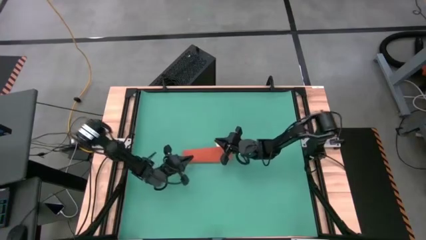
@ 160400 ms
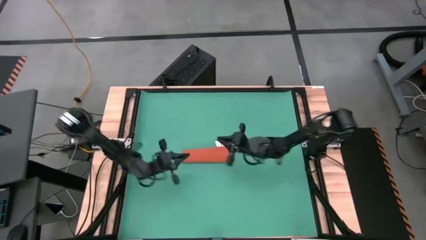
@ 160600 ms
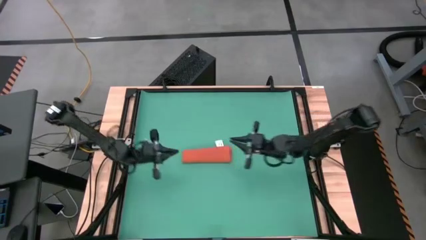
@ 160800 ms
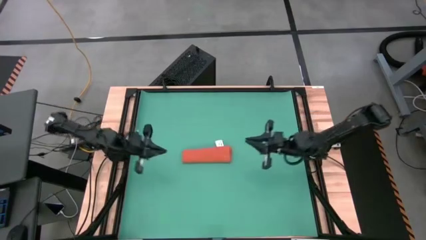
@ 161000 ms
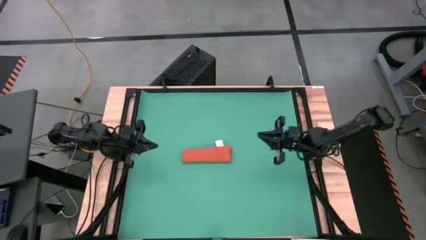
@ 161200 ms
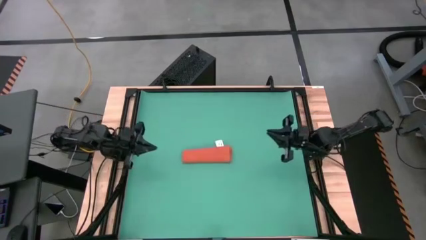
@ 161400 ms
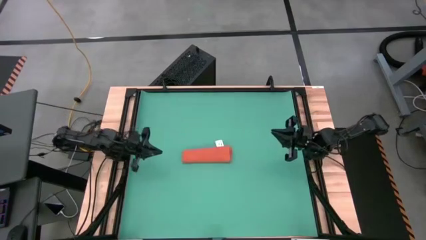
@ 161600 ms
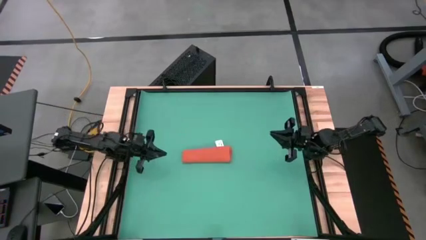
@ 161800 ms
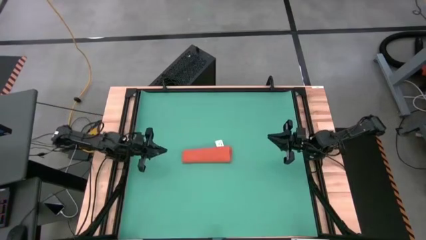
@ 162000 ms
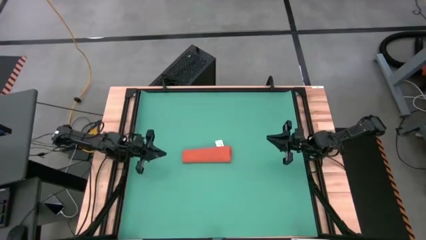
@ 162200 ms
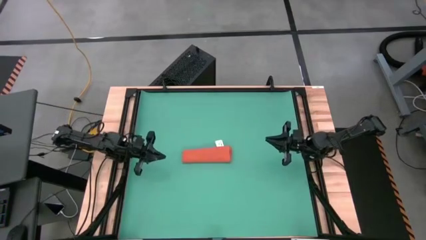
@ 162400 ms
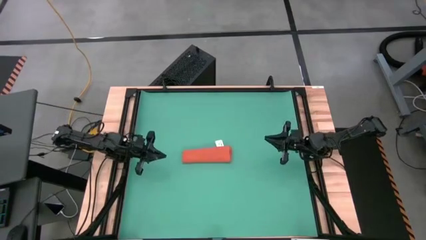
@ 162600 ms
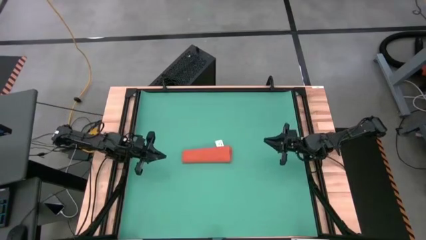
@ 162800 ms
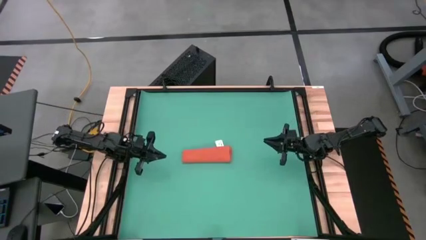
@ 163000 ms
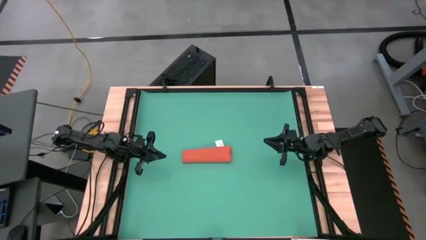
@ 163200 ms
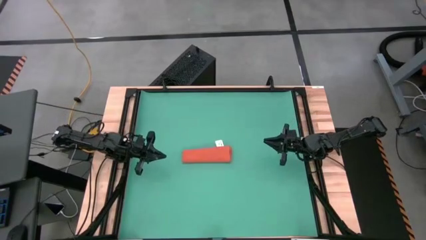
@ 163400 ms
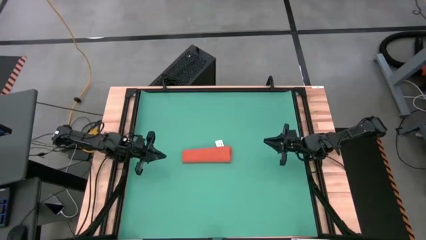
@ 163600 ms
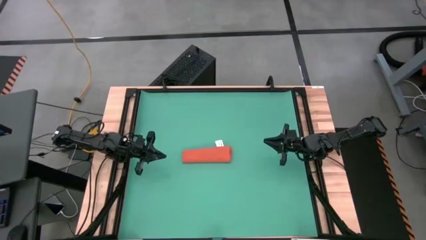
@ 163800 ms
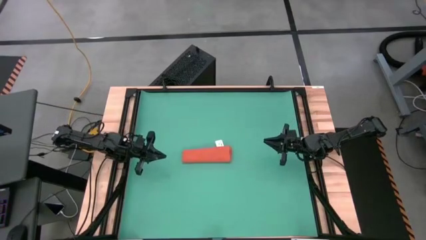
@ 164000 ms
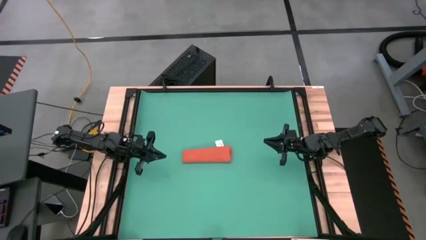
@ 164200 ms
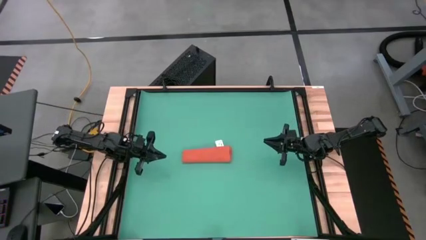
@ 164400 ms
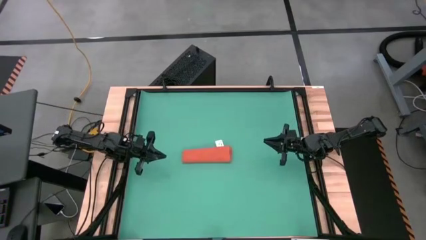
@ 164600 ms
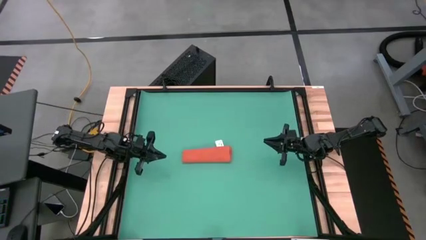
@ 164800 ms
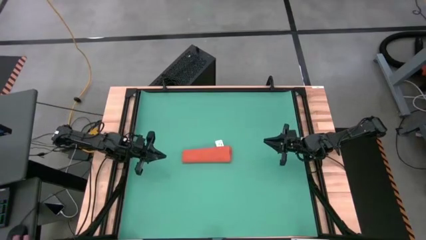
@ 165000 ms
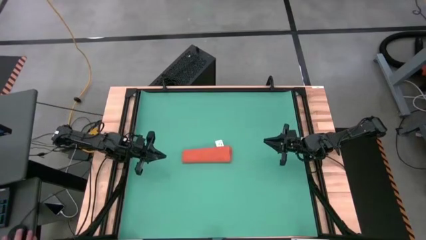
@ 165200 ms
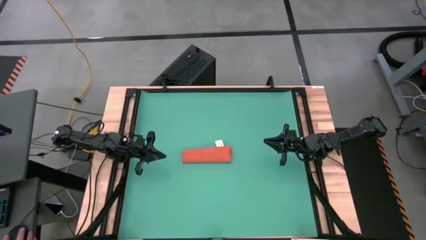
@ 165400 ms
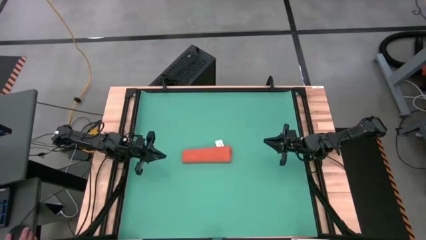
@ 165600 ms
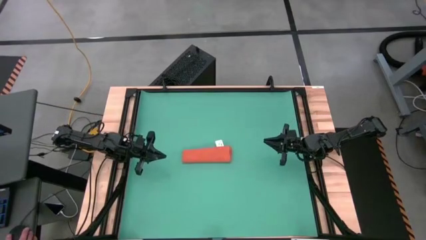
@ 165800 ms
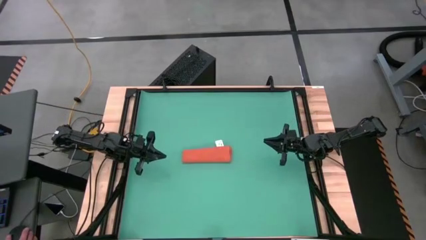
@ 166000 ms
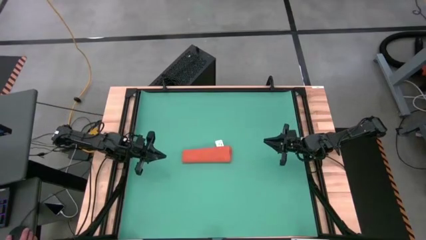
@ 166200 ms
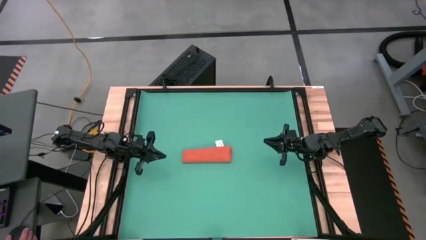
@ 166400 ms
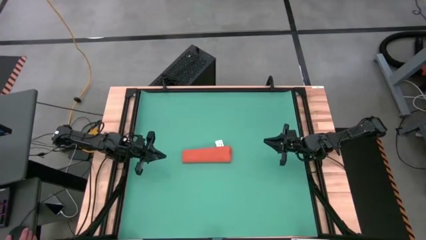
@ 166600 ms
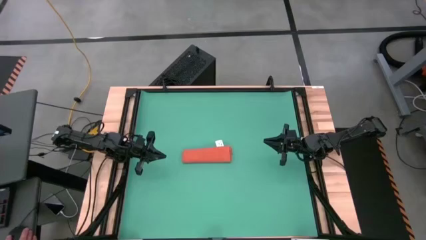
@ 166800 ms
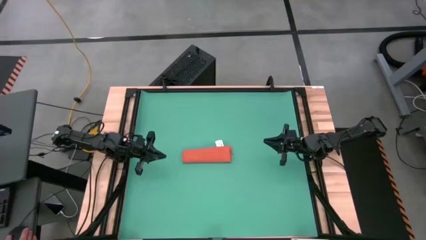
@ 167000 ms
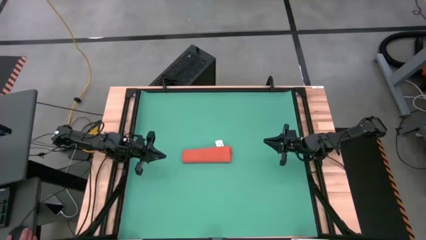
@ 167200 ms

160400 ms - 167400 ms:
Task: Roll napkin
Return to Home Position

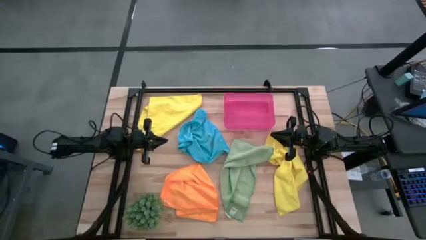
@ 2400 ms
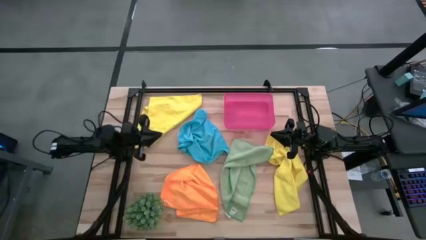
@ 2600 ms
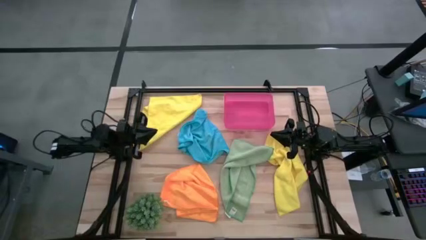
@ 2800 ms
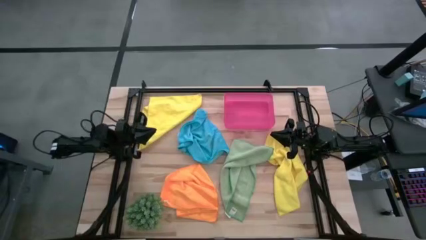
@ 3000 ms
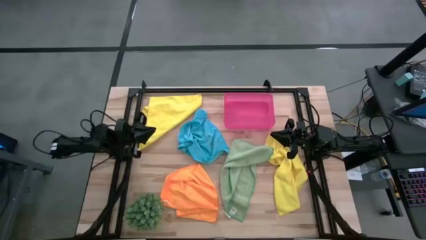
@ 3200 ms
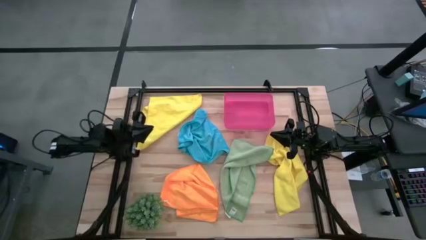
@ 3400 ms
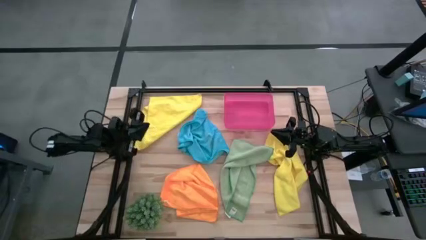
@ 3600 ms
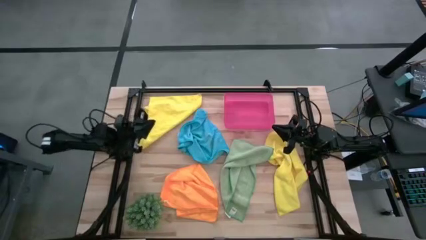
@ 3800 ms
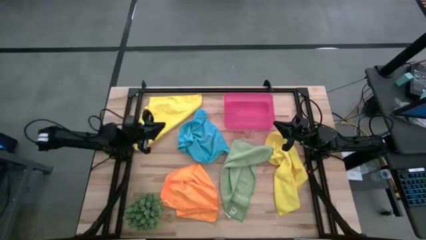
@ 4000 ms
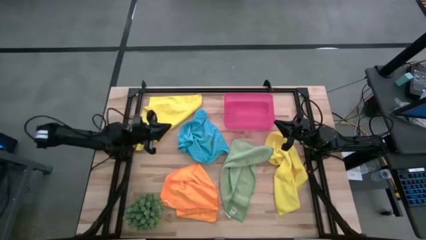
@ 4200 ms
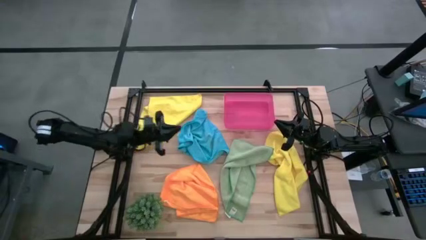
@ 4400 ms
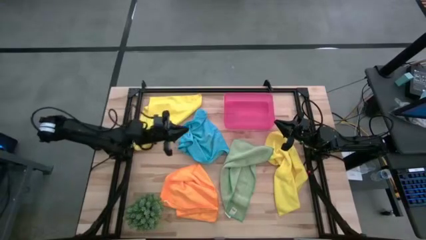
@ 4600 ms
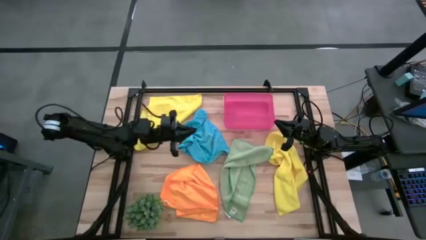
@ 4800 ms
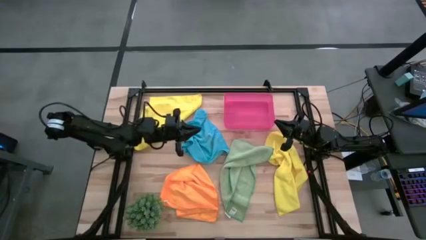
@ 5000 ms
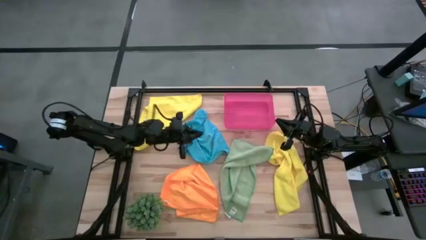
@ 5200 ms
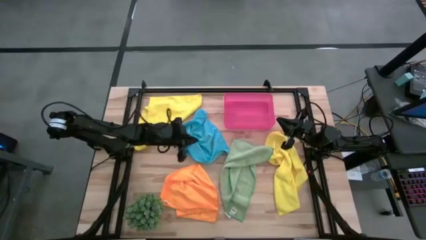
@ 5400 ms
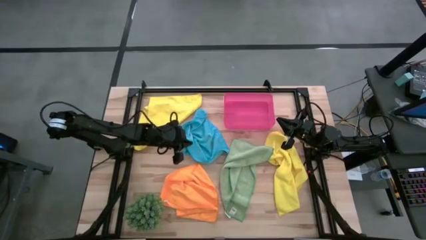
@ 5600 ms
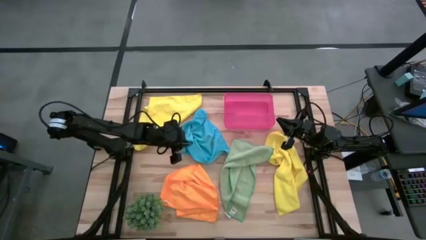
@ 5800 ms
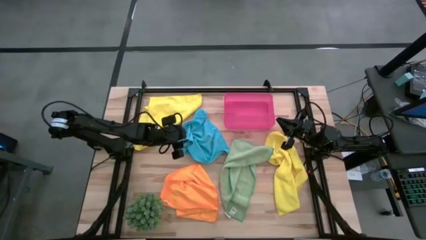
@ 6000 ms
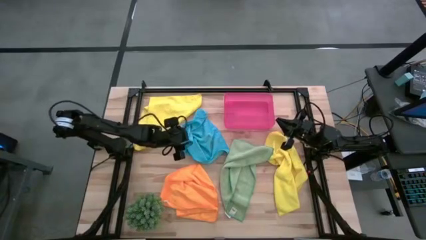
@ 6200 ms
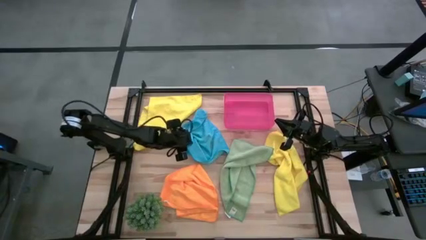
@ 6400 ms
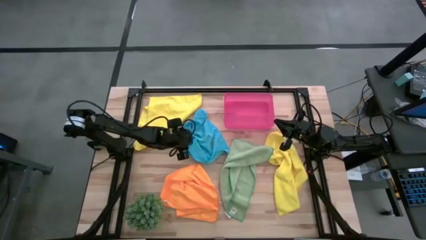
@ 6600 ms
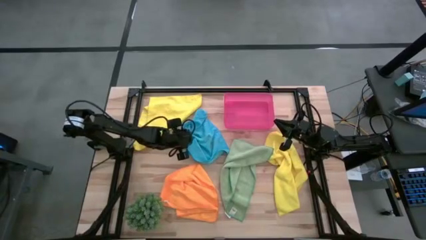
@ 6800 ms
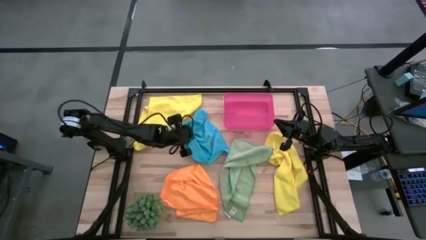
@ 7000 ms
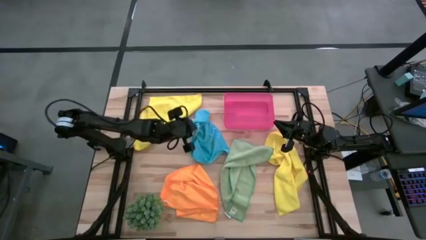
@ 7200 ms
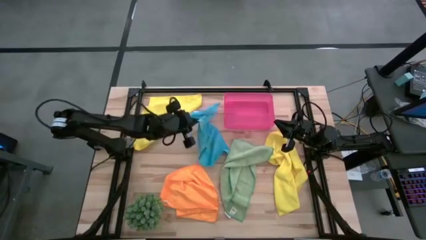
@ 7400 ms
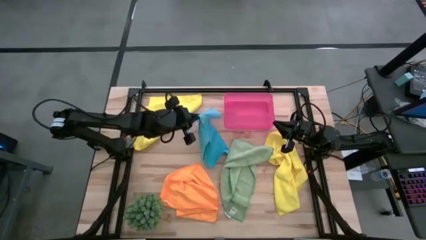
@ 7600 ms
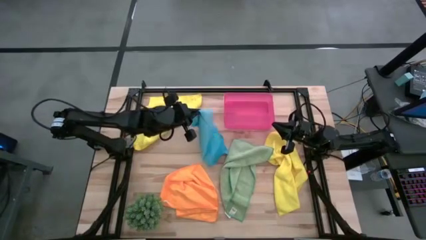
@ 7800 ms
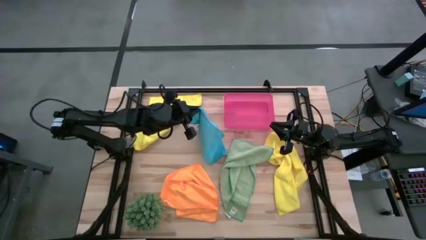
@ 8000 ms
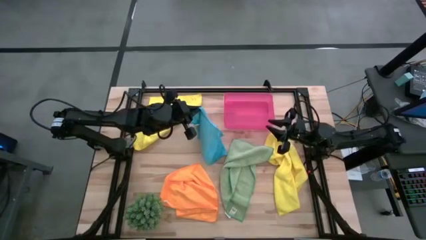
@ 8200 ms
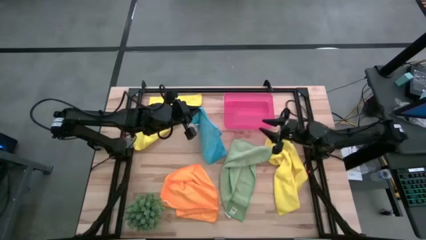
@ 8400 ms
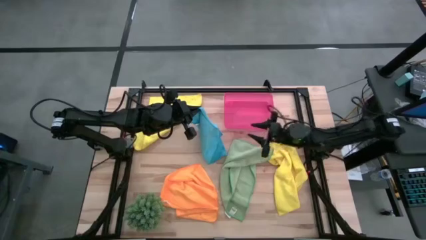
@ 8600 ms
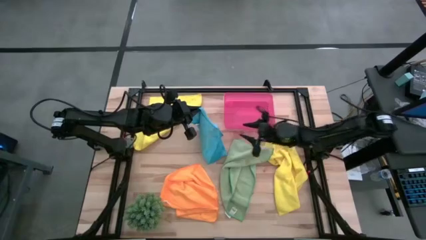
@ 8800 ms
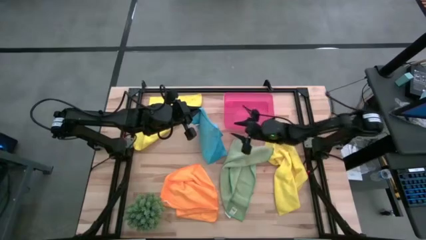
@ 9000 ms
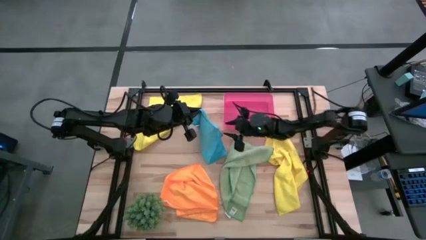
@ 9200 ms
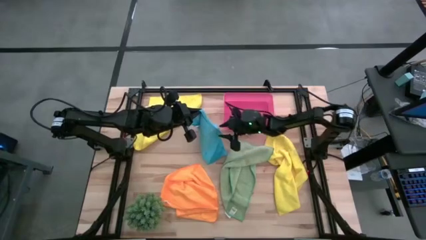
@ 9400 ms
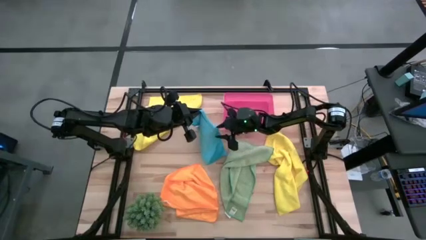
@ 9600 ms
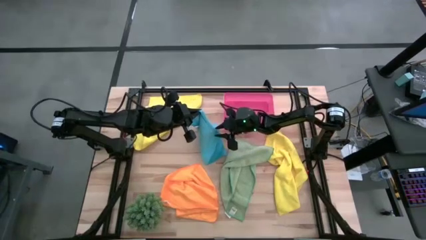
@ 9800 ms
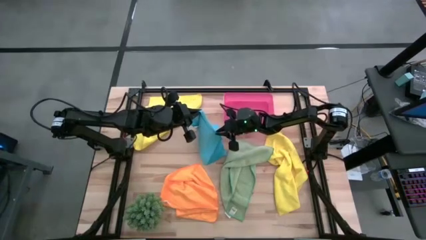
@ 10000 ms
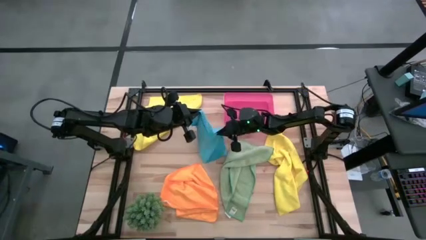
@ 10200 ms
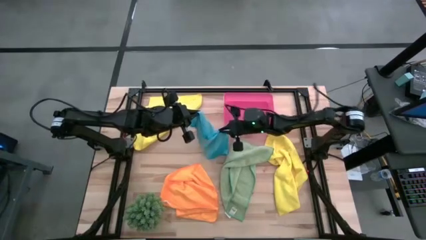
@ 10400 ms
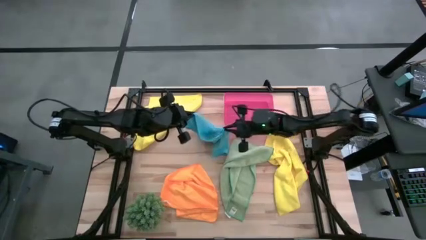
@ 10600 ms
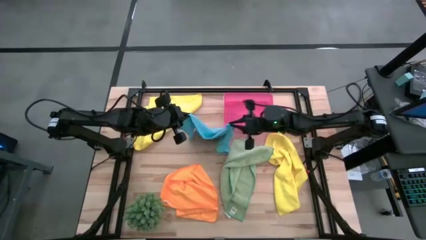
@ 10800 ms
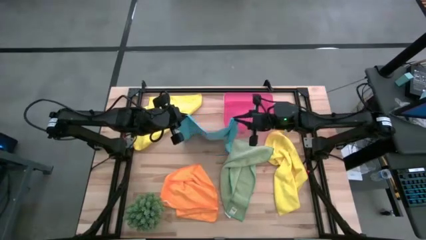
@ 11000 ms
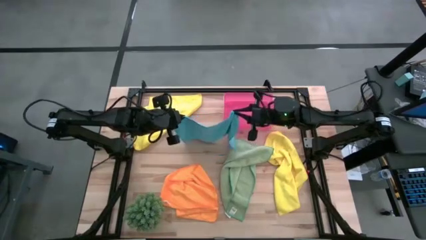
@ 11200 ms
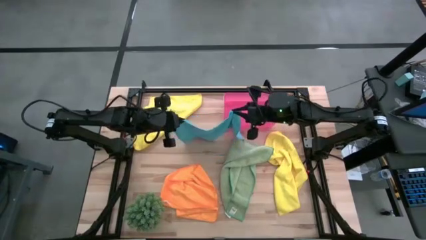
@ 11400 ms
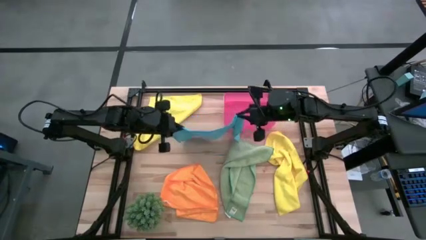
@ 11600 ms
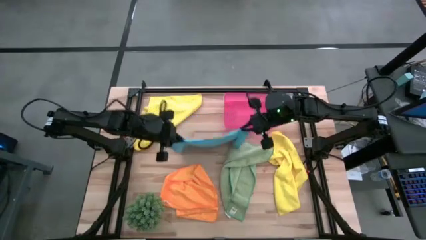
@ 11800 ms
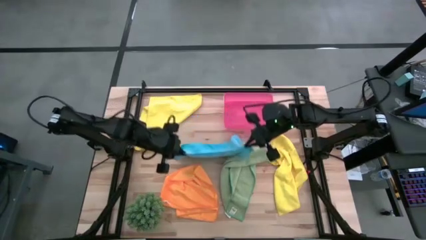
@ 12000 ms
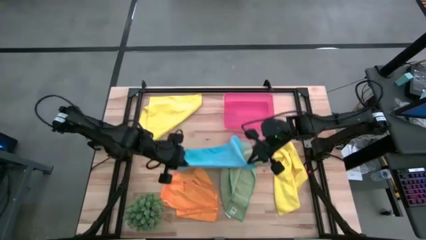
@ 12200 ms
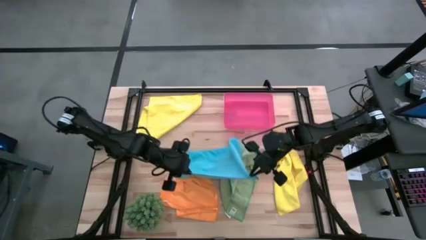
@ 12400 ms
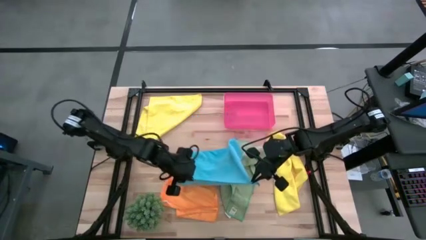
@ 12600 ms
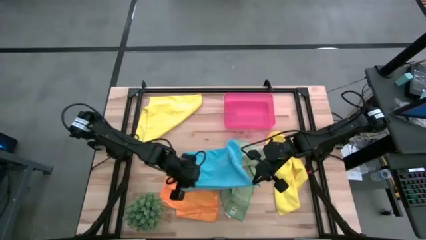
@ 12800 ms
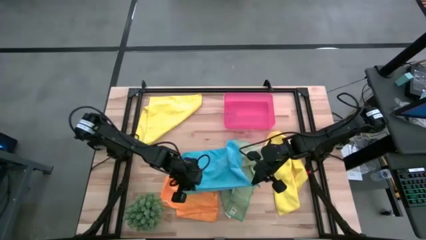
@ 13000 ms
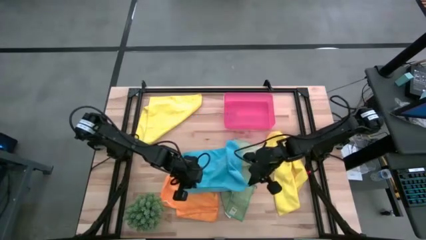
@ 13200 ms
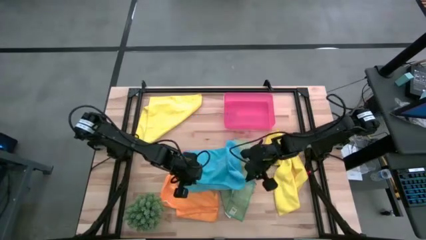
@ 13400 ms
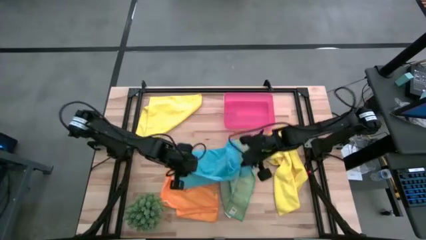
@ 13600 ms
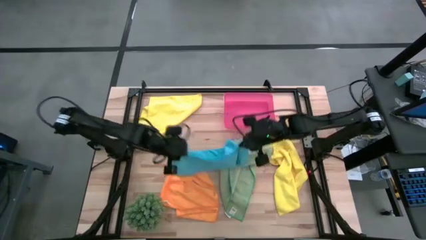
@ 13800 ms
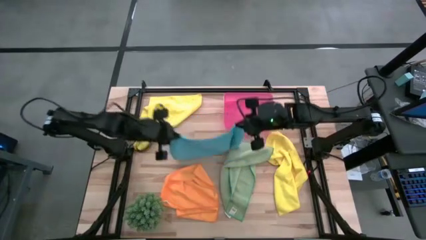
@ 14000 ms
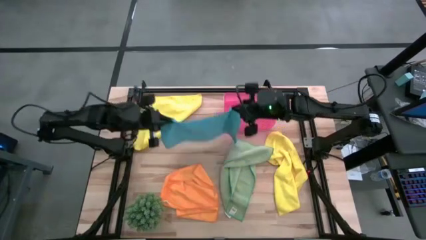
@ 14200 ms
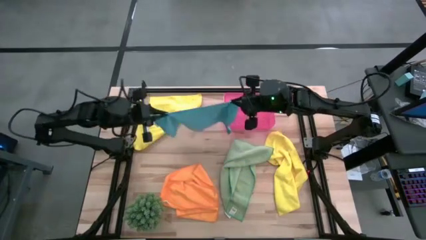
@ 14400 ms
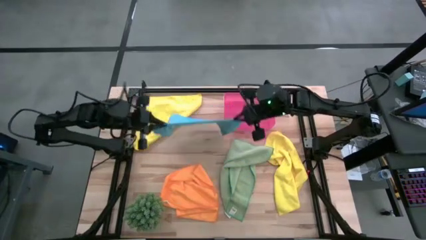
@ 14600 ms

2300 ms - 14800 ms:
Task: Fold microfiber towels
Fold the blue microfiber cloth
